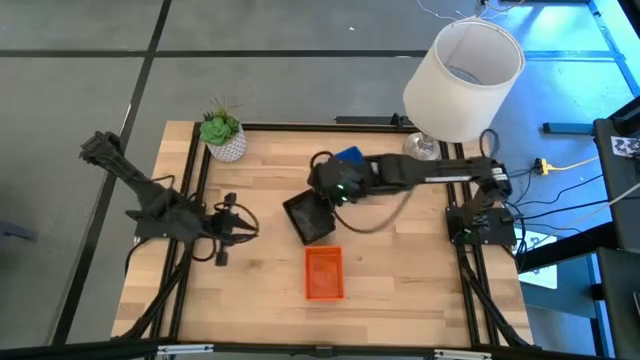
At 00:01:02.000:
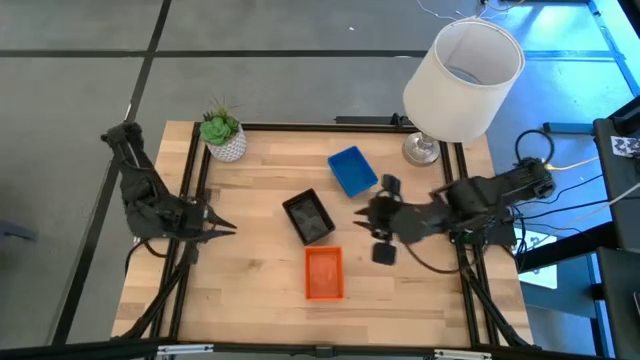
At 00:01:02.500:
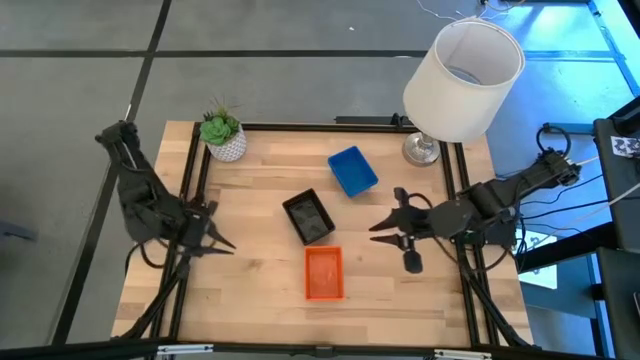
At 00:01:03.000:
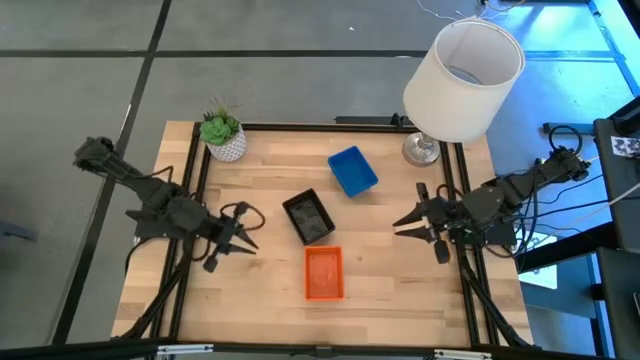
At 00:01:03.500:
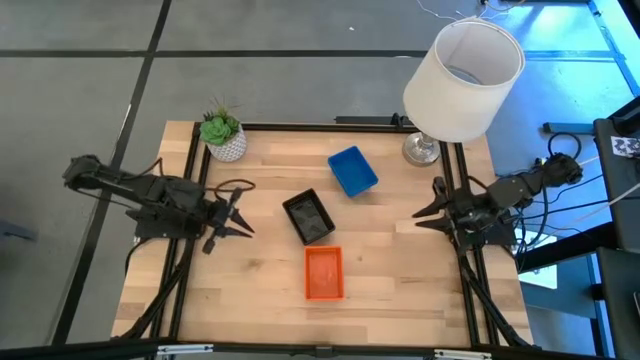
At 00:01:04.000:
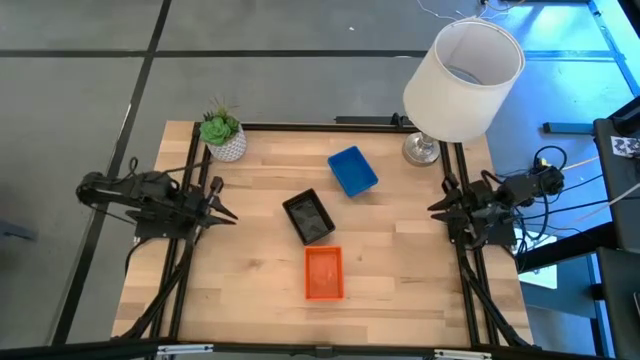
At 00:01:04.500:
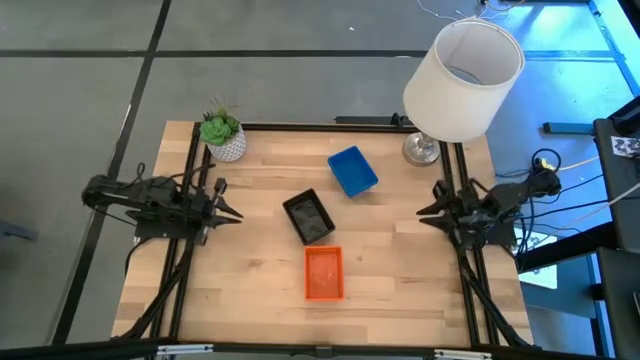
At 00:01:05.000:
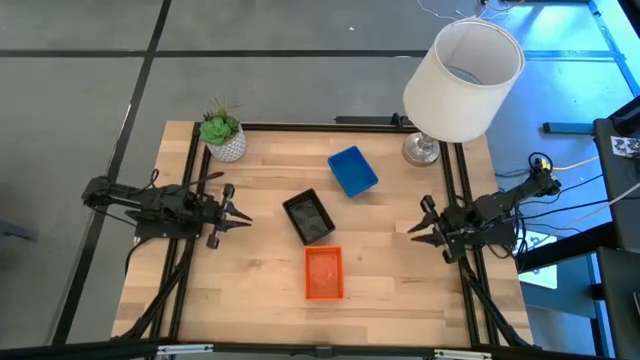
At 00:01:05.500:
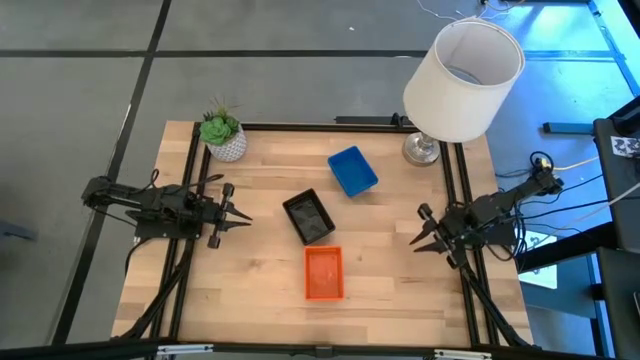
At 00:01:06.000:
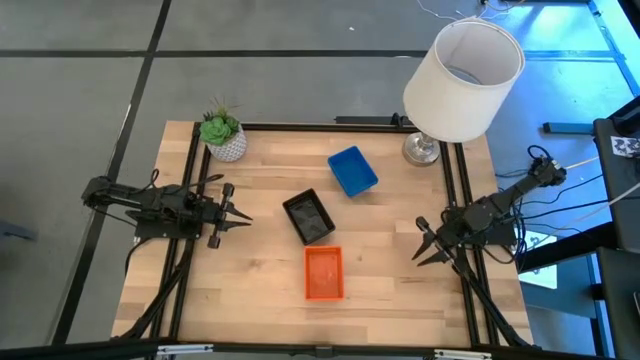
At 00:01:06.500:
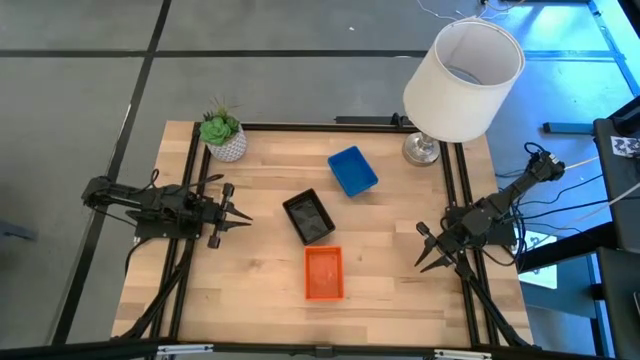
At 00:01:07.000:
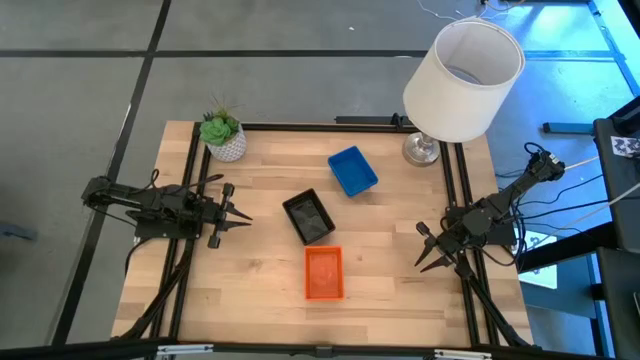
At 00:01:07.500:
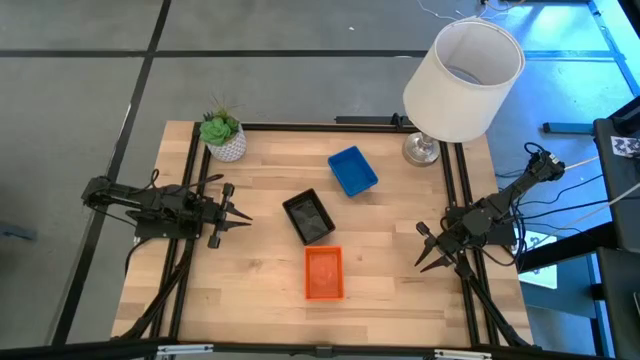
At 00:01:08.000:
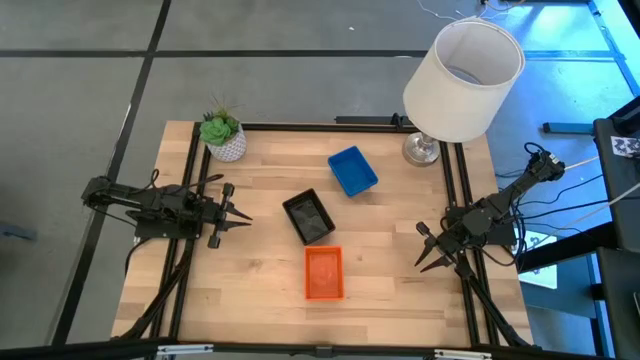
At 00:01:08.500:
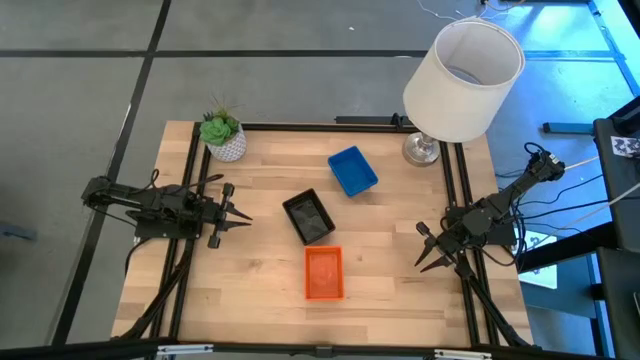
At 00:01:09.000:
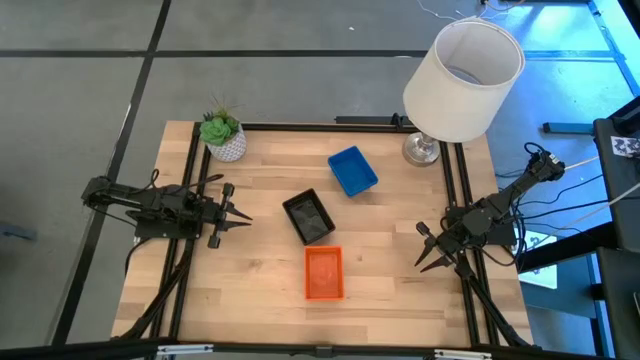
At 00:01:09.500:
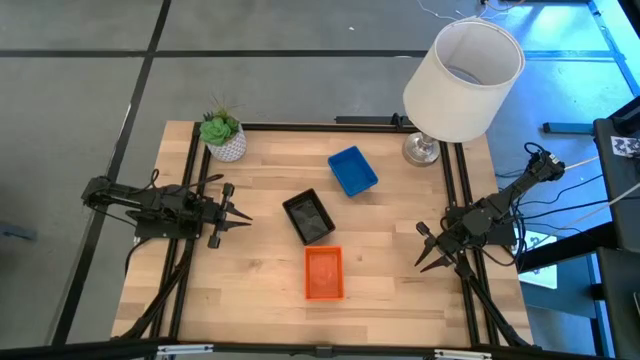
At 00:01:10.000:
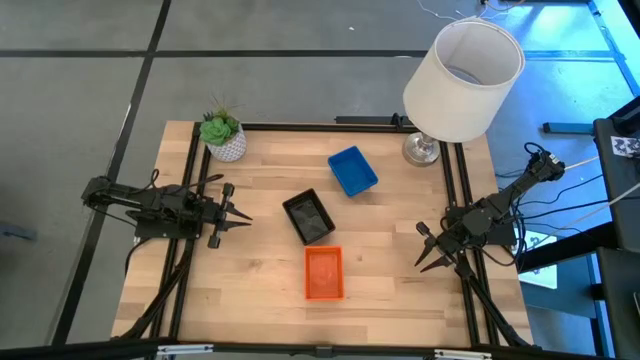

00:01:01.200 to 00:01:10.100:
Return to Home Position
